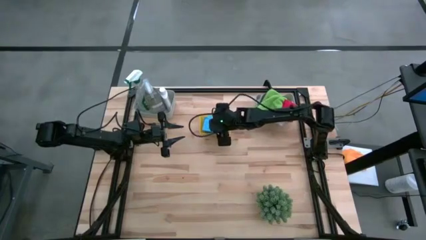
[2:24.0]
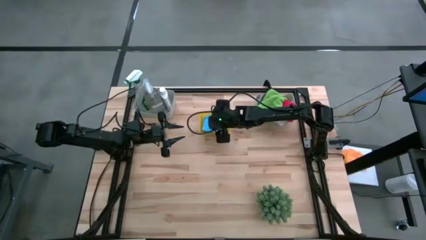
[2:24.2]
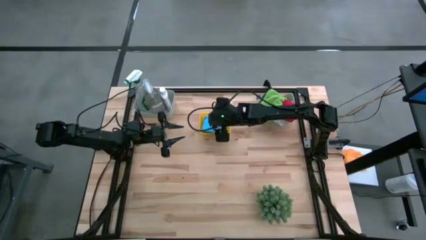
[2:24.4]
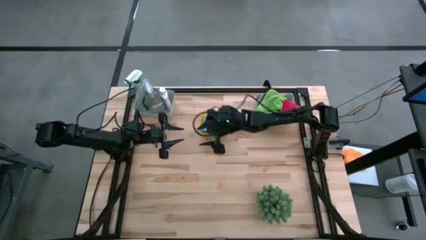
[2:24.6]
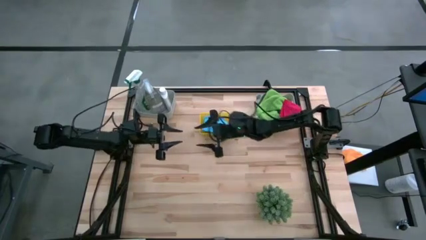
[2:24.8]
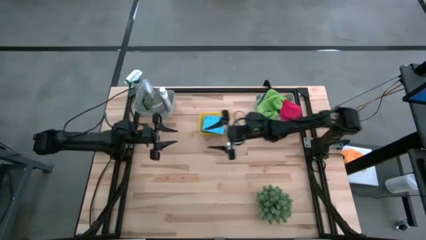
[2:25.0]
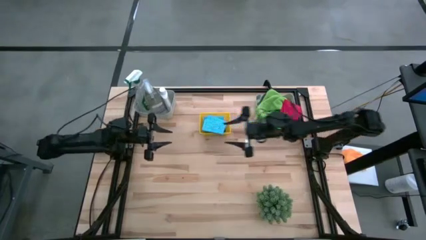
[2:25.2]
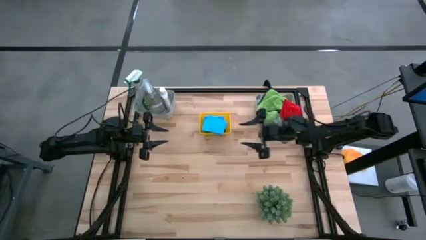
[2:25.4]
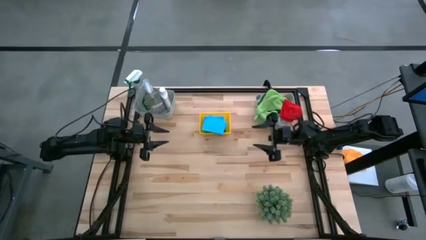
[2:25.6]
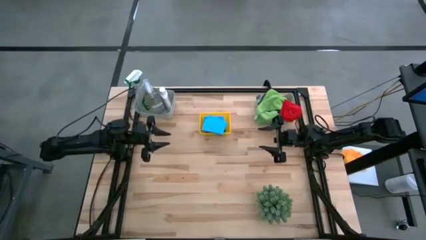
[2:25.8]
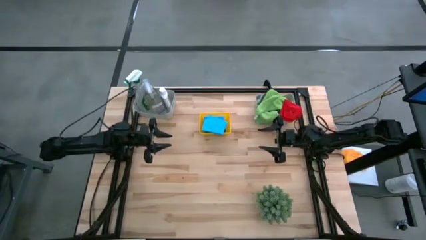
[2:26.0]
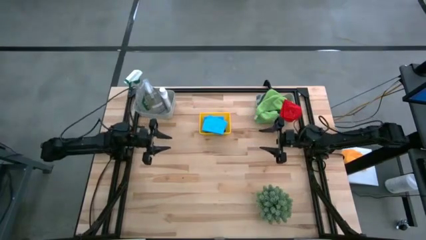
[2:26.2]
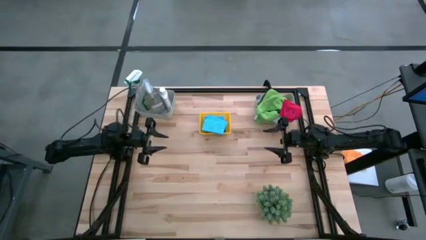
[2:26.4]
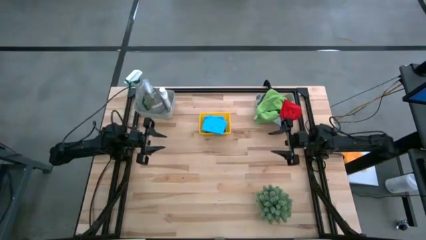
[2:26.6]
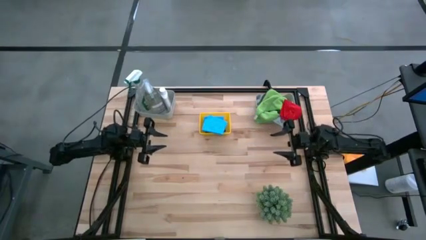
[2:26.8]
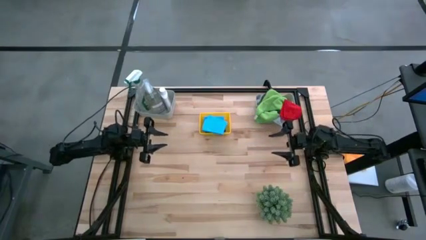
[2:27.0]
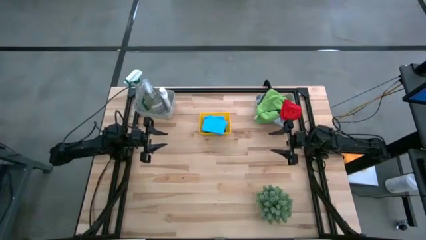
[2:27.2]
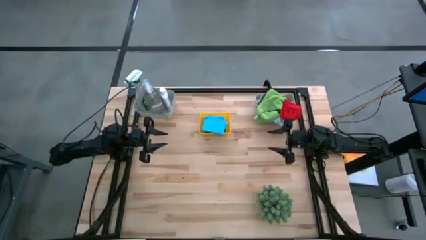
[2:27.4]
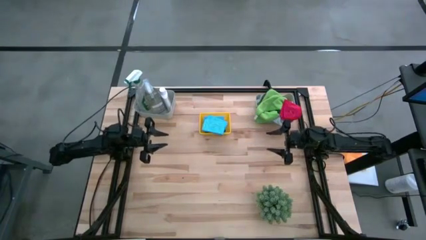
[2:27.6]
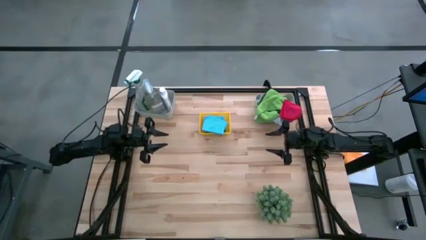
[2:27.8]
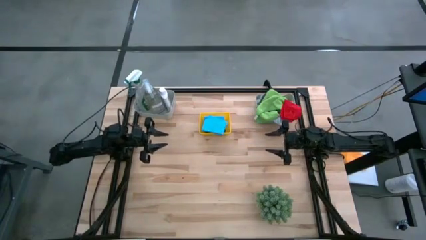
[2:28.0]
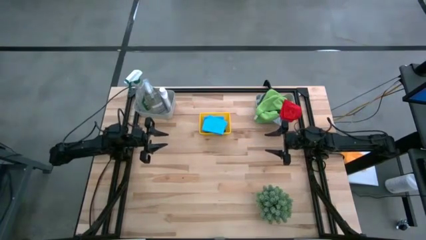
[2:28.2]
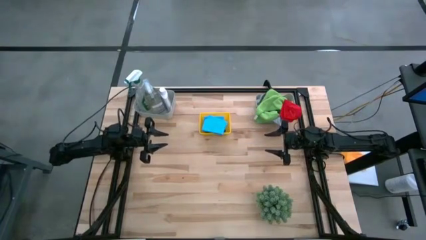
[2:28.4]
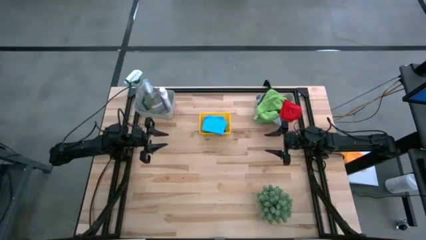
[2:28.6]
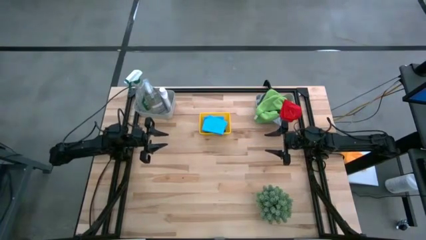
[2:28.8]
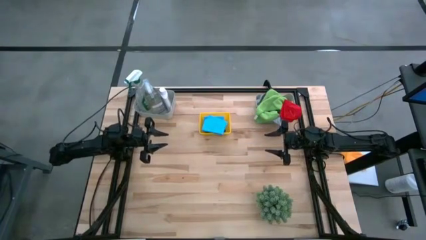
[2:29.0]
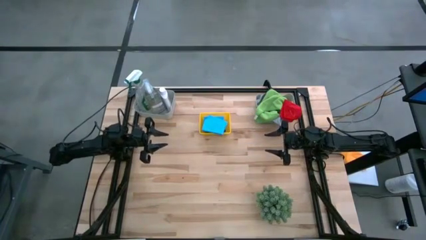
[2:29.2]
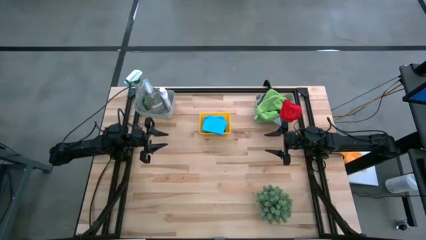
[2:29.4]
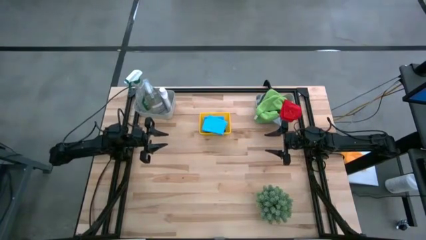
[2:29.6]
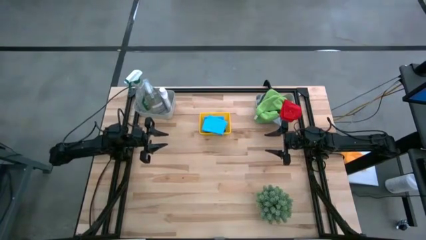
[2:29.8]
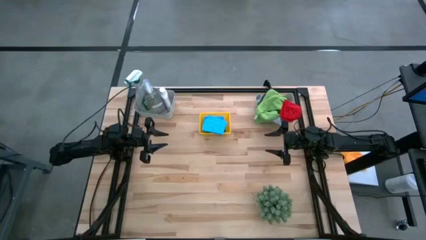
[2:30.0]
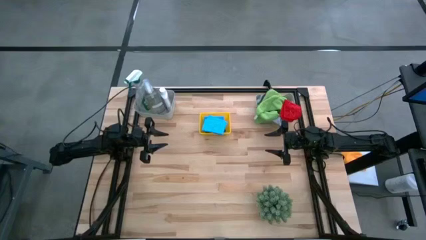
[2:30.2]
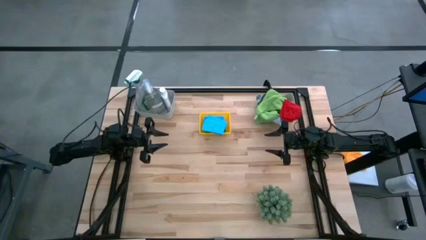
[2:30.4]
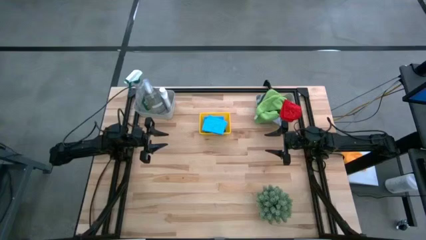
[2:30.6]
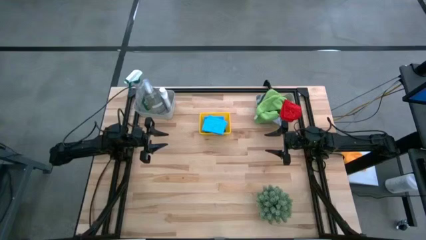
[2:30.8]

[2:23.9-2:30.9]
Task: Pick & Place Kitchen Items
Return to Home Position

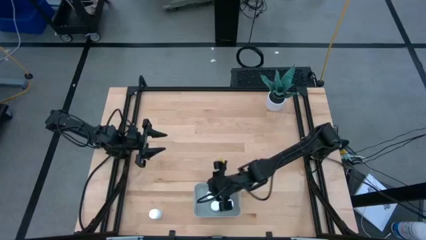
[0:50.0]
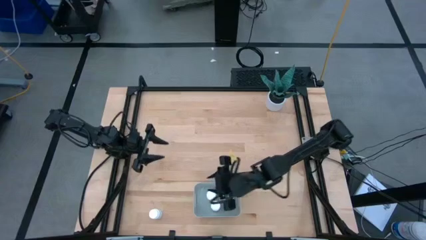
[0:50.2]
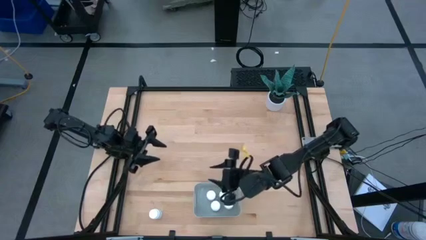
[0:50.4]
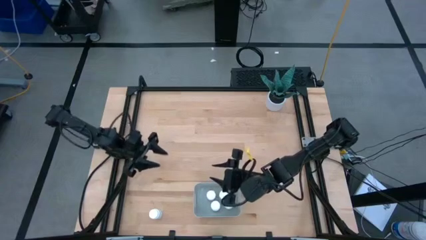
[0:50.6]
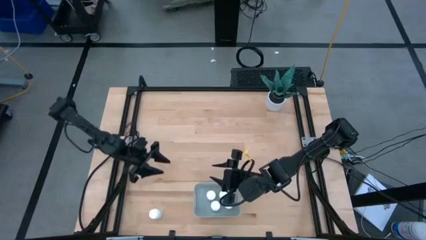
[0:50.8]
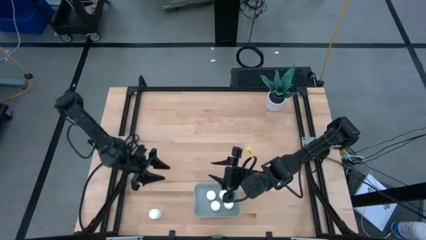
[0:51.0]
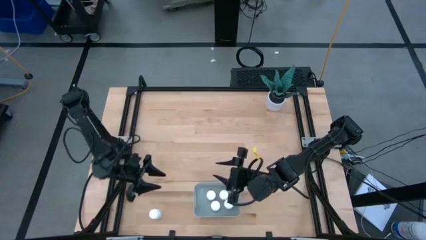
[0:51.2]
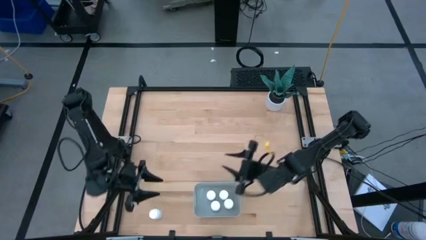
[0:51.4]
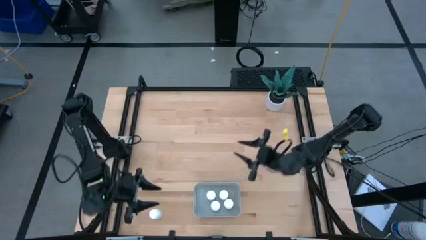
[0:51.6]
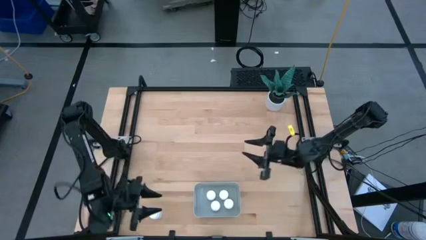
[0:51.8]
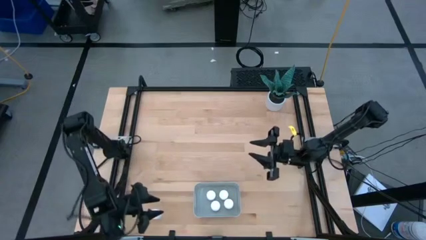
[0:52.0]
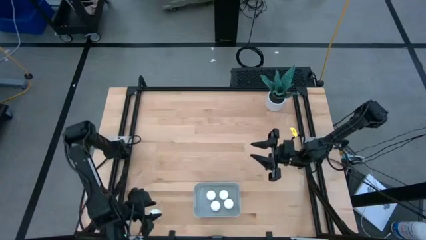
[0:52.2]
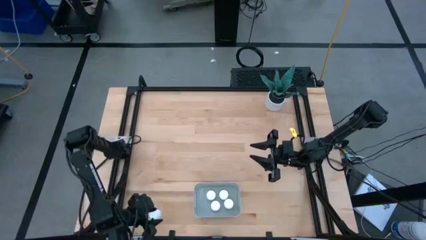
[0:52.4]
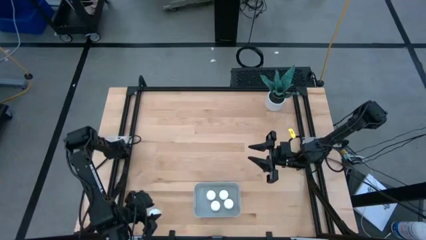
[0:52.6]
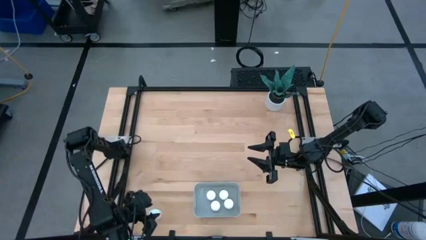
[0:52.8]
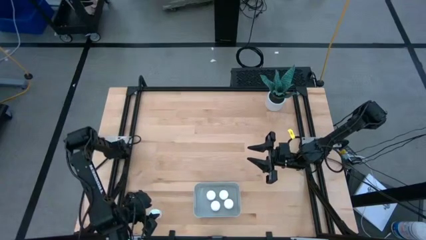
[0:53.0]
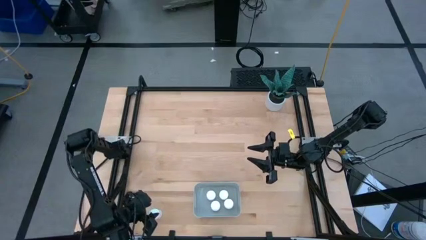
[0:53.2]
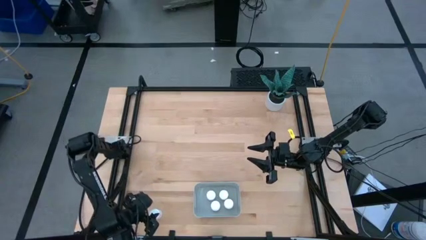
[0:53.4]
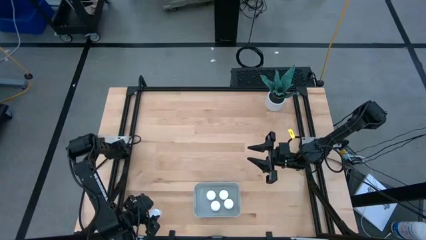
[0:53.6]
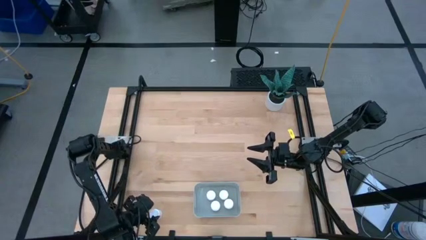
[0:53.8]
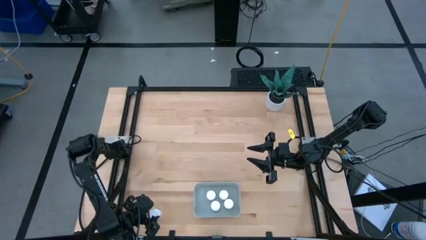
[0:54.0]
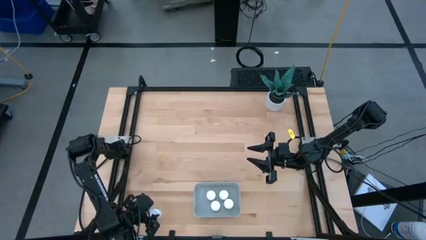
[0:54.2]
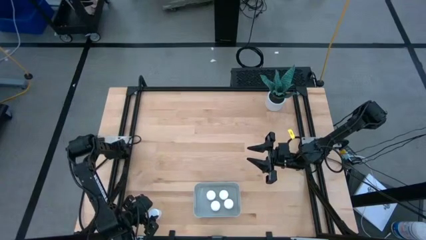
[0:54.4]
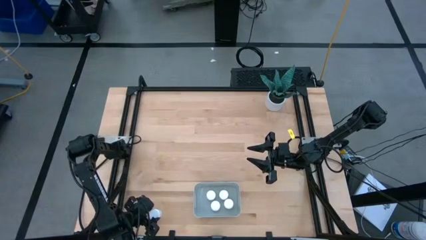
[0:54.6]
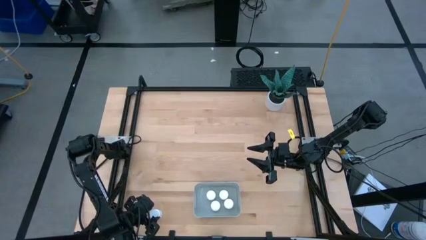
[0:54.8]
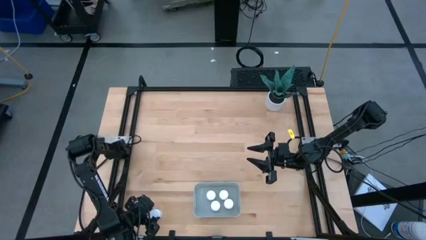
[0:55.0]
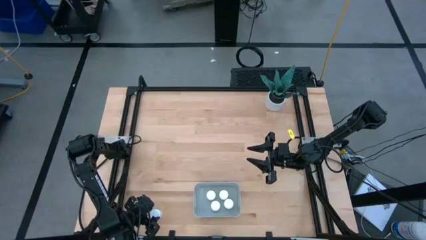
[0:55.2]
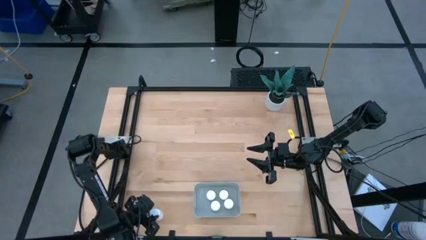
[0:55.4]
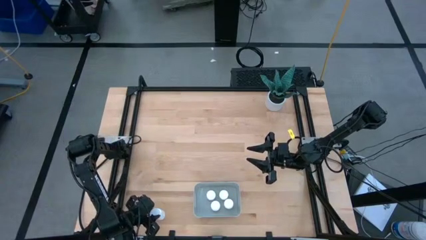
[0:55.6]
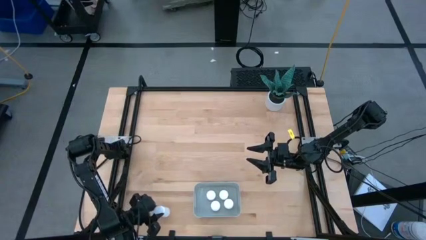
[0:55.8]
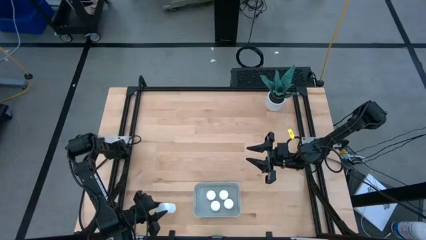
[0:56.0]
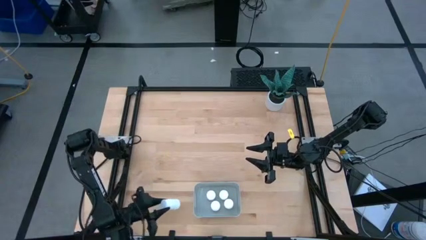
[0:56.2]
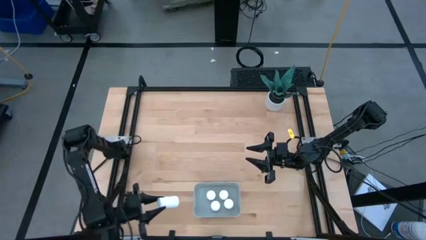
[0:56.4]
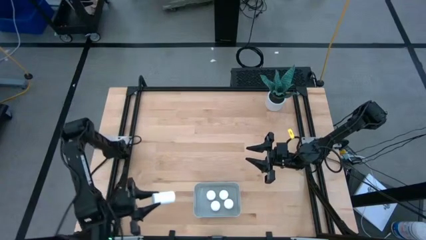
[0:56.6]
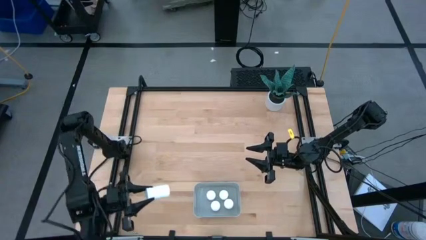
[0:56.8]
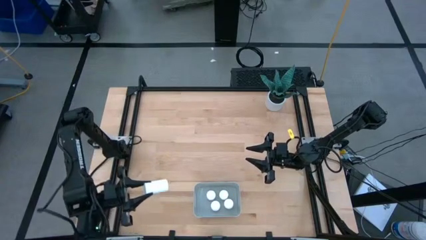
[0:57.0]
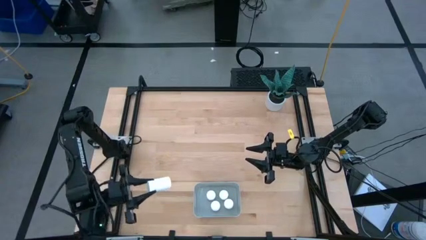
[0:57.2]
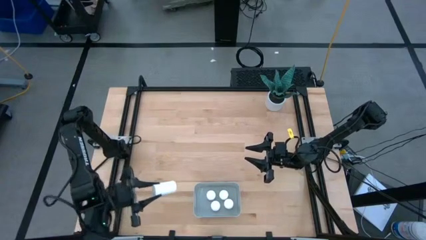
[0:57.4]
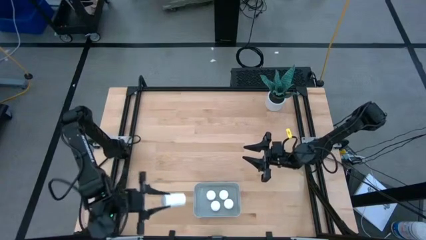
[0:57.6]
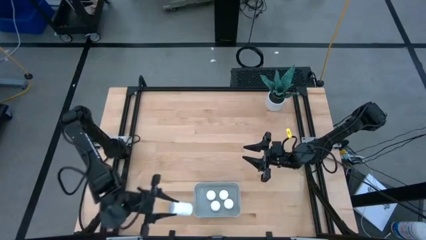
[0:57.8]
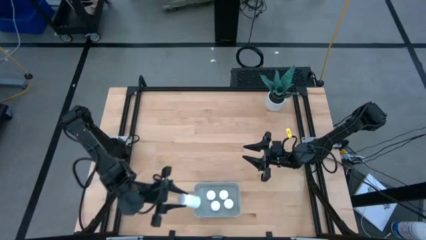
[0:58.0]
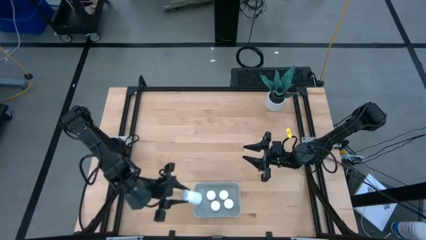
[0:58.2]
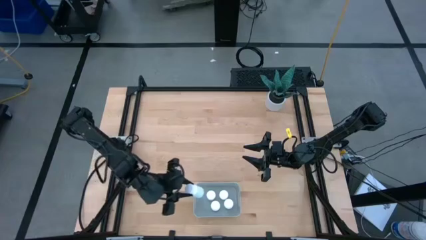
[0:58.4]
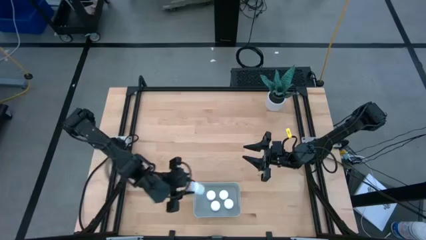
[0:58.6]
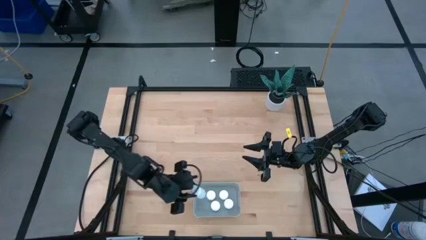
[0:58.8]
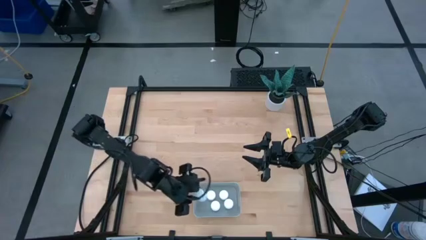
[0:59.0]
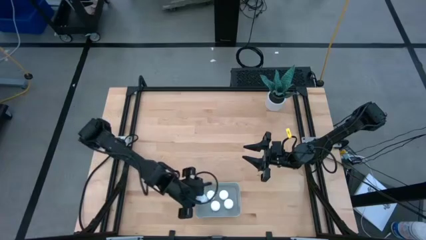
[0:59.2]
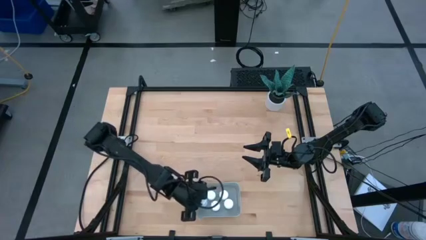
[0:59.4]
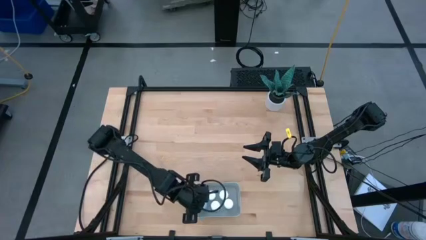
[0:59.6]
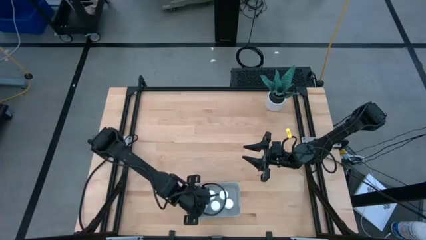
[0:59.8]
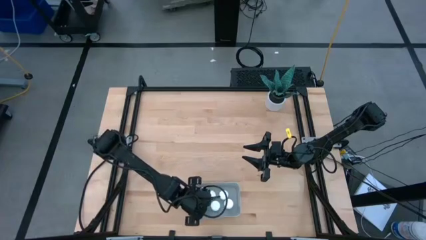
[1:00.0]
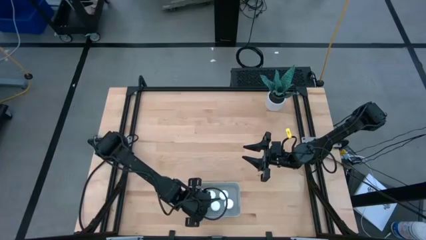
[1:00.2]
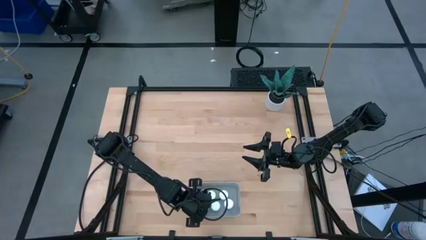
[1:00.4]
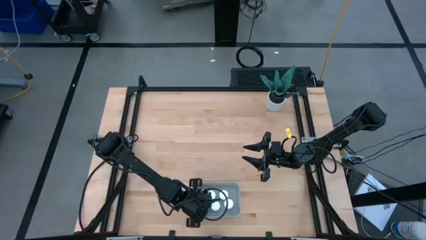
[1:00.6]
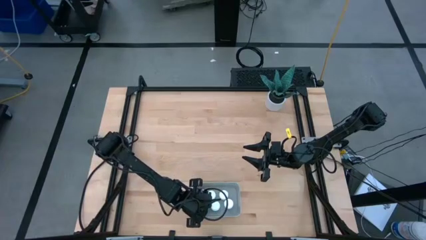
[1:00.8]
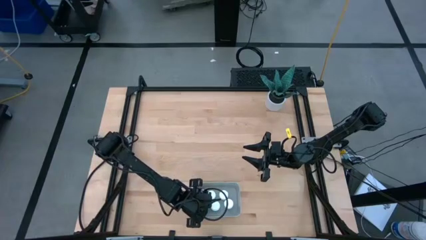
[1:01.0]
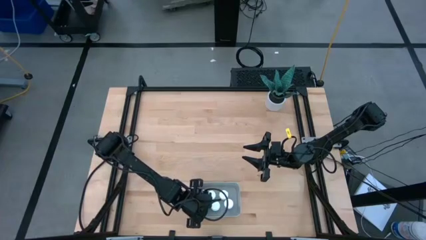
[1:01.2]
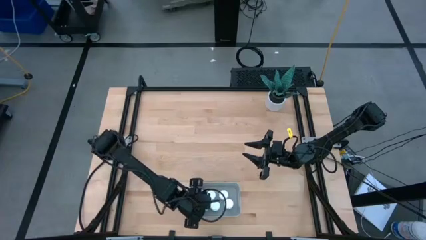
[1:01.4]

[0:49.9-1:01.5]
Task: Pick and place pill bottles into a basket
Put the white pill bottle into the gray bin
